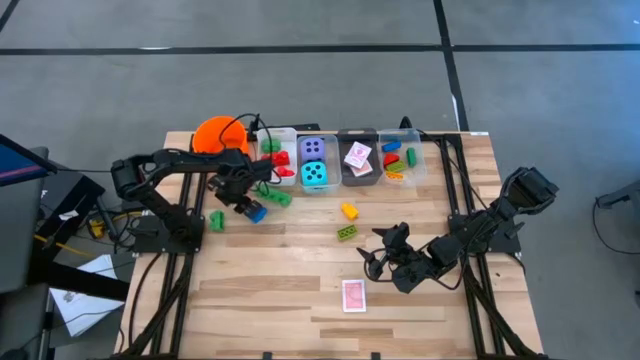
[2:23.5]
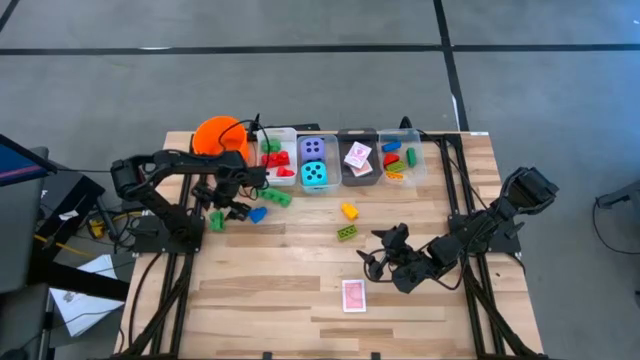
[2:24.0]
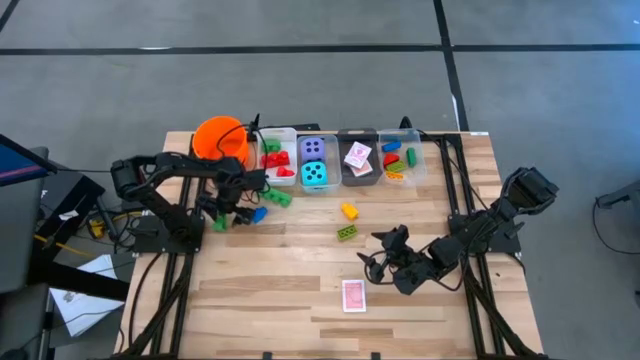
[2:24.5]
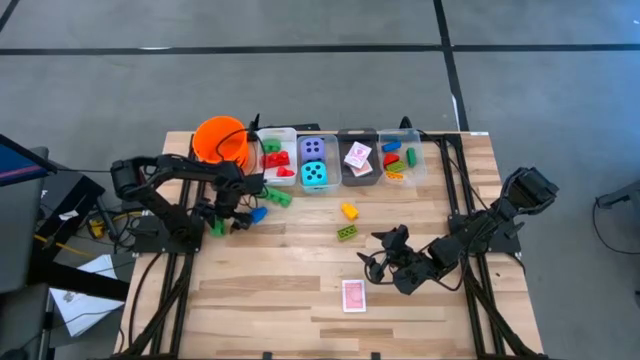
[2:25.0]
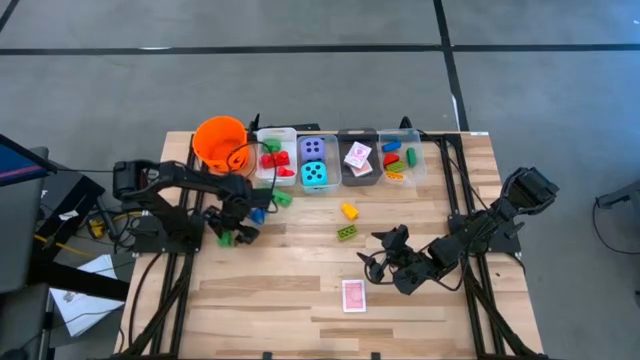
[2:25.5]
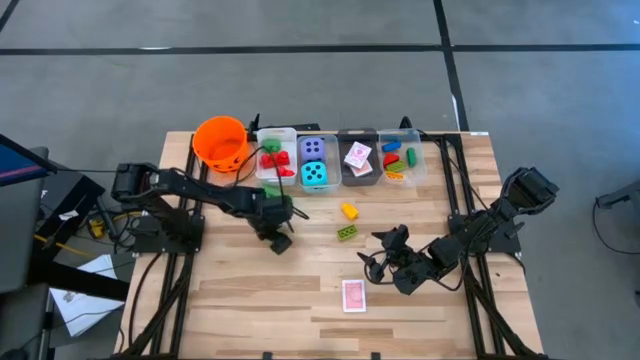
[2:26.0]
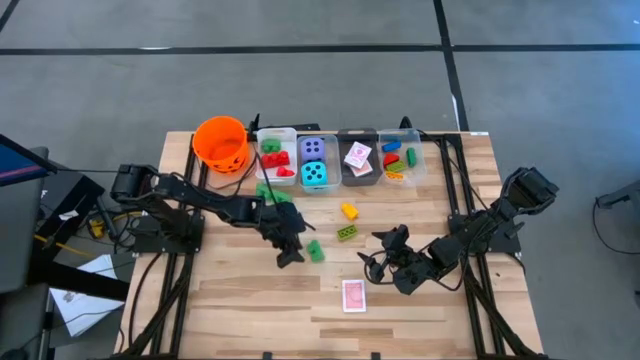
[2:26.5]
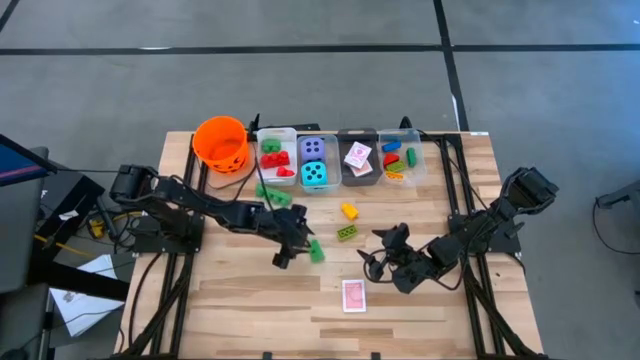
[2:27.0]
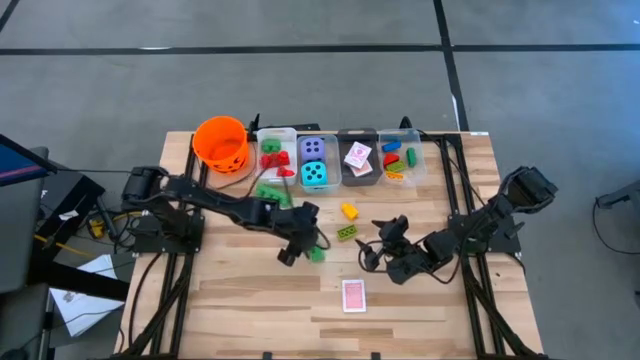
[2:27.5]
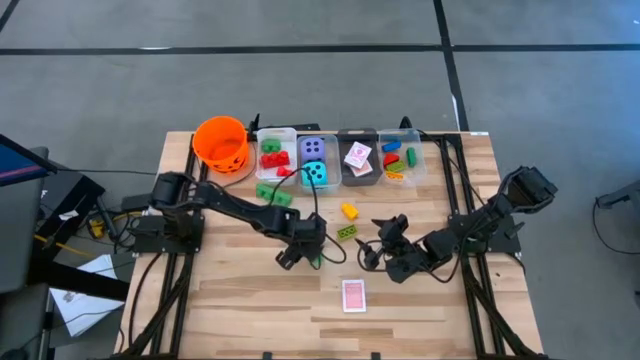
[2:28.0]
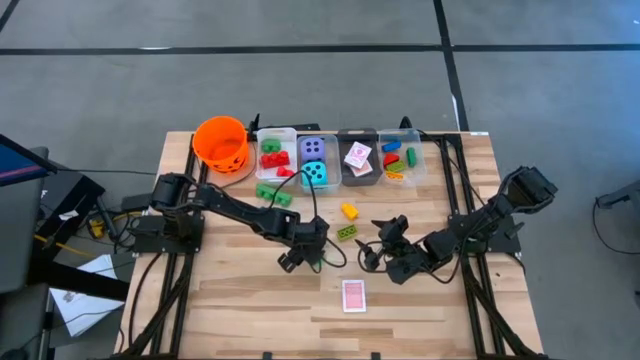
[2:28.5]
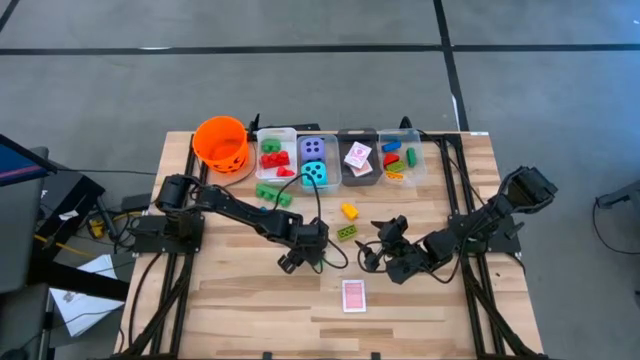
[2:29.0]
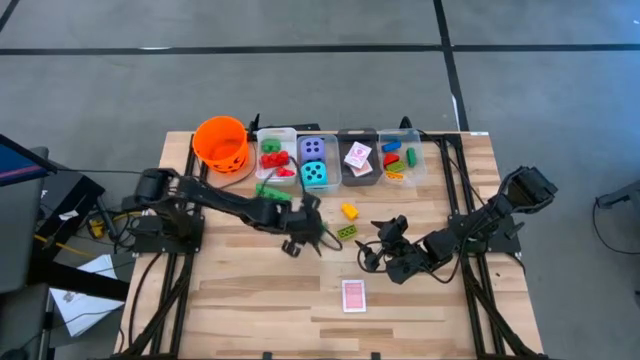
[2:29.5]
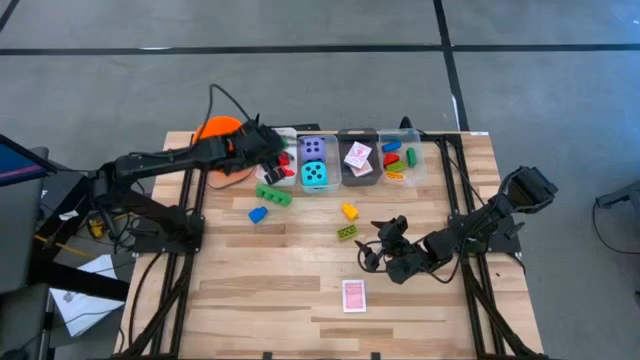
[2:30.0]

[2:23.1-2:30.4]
Task: Pick & Place Toys
Put the big green game piece into the white bin

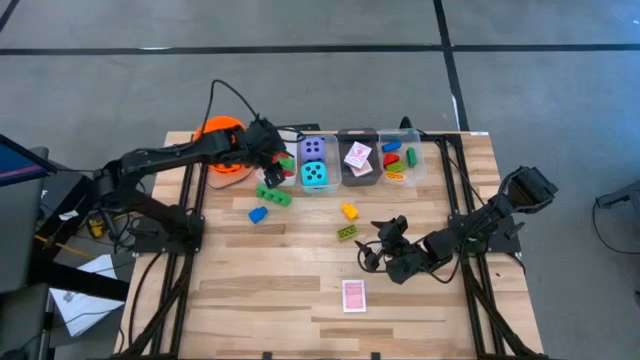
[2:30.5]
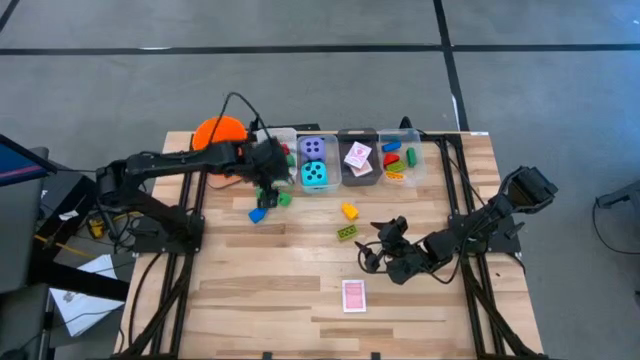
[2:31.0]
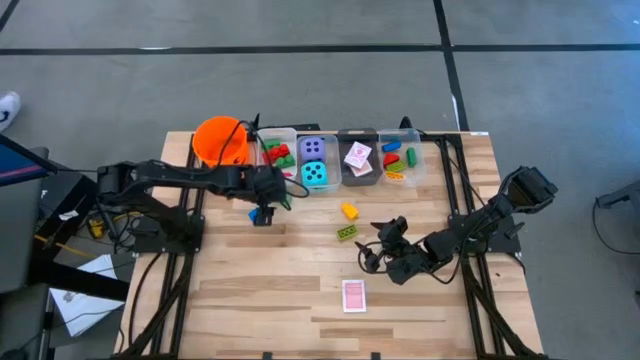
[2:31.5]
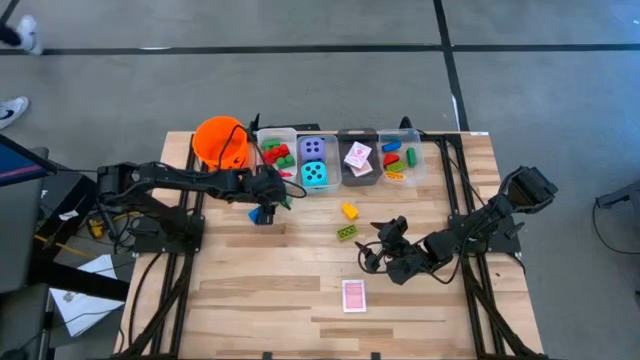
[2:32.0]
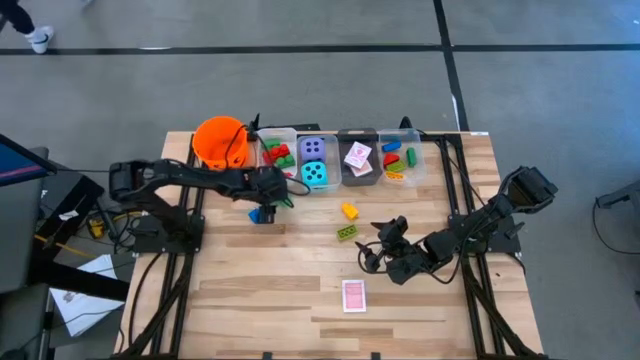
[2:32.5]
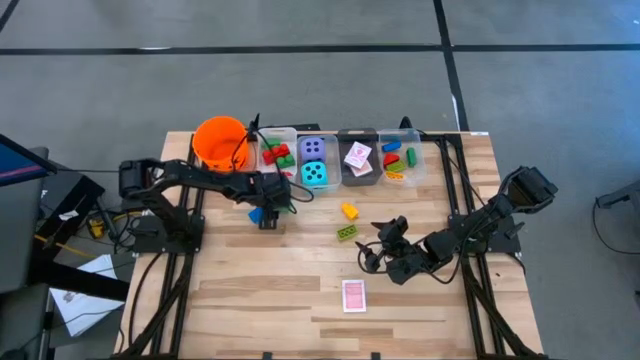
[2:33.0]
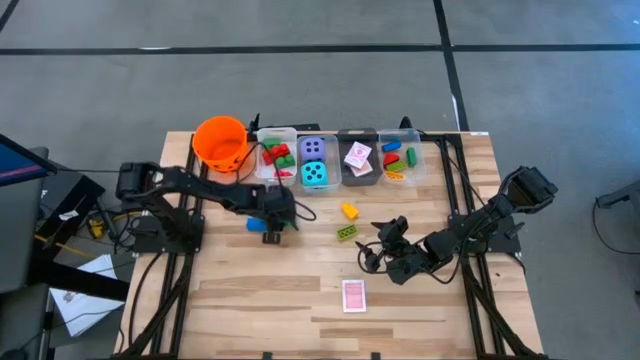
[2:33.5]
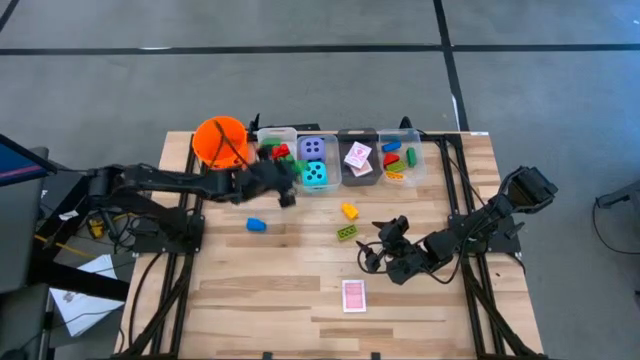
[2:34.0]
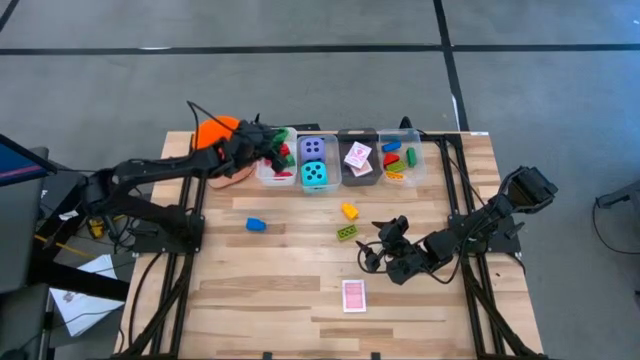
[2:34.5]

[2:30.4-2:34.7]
Put the big green game piece into the white bin

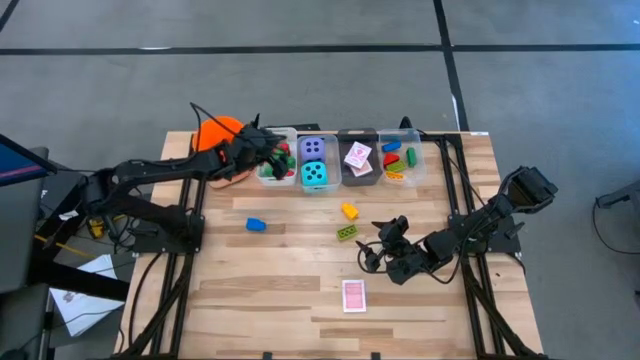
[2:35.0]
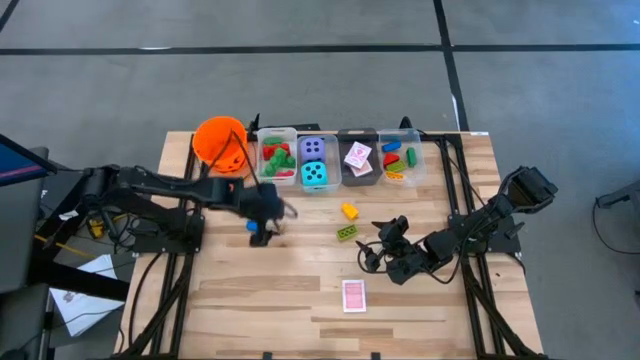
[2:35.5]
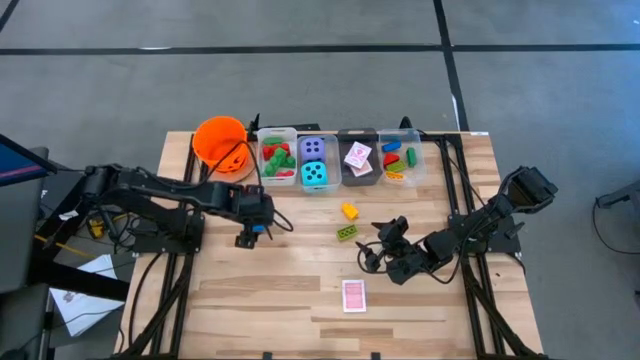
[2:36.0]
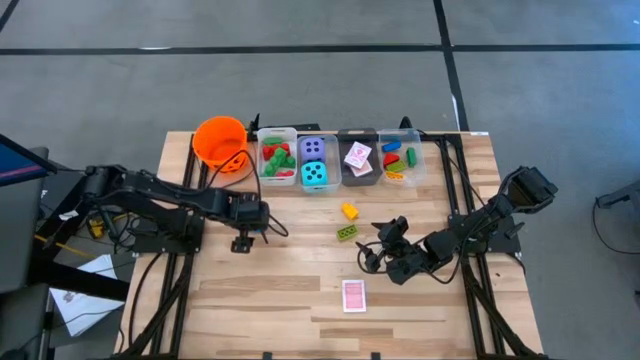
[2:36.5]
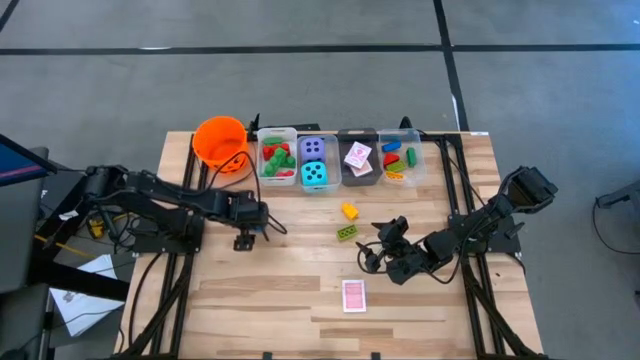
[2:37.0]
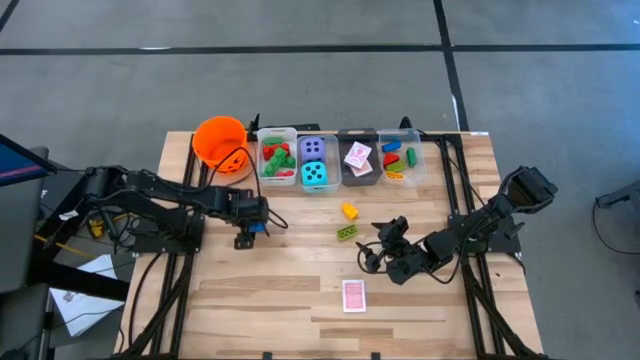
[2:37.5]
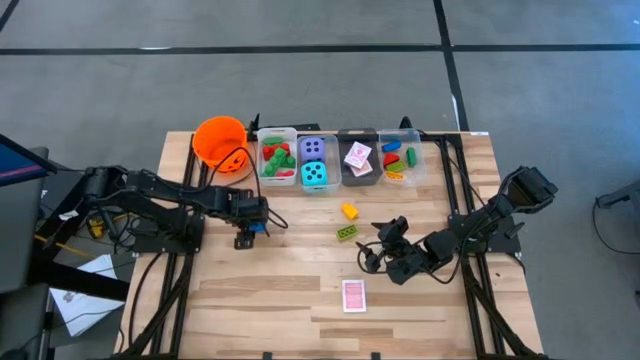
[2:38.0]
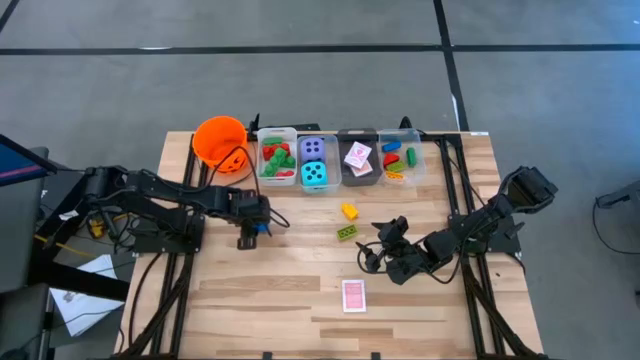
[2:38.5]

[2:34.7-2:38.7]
Put the big blue game piece into the white bin

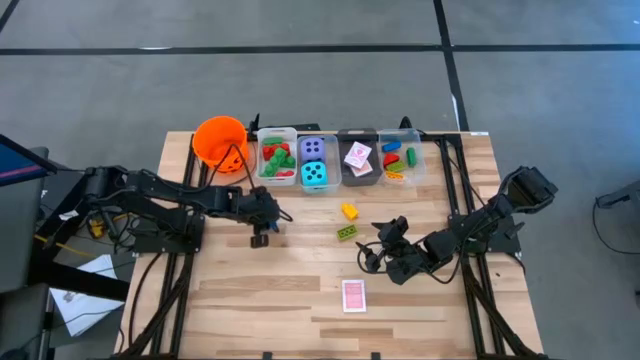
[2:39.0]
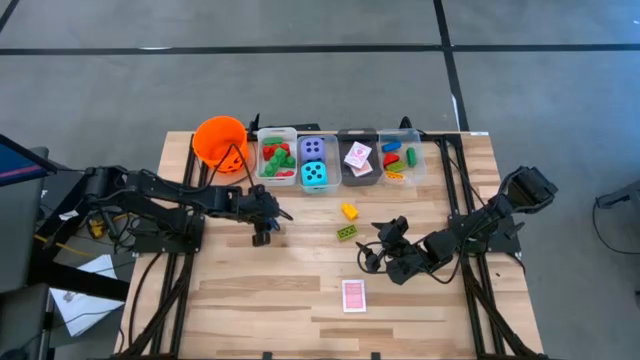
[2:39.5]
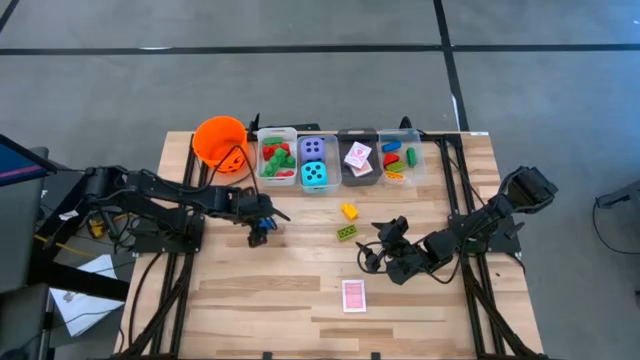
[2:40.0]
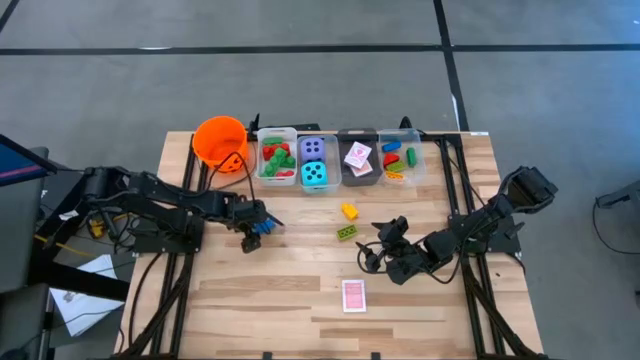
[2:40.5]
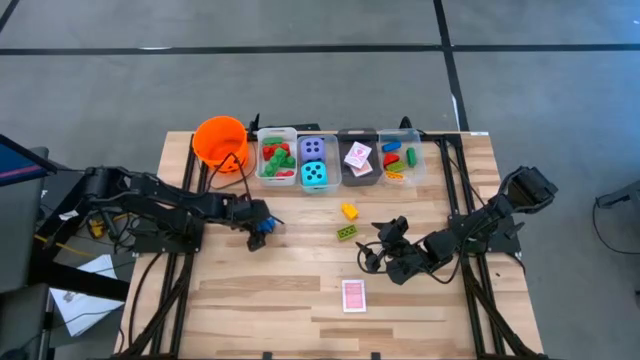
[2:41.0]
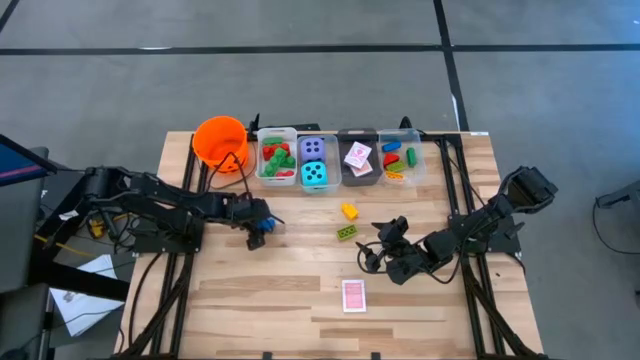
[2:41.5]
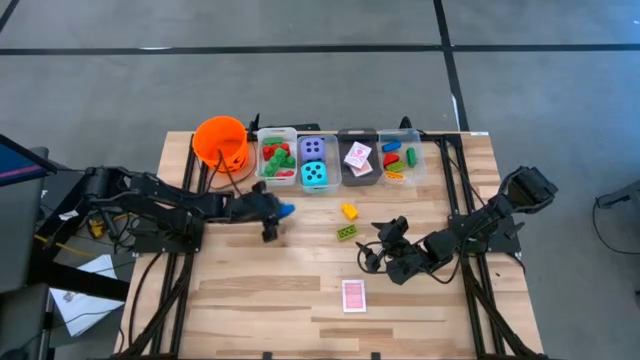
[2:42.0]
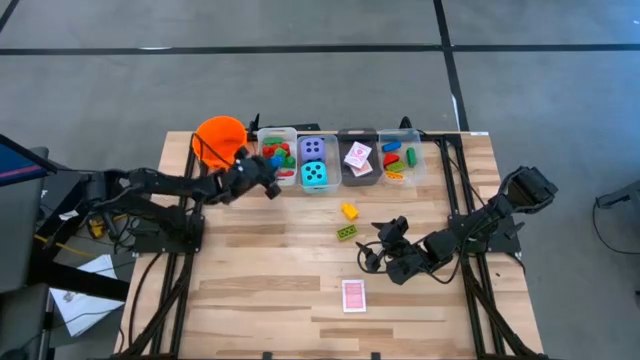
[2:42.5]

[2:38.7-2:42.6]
Put the big blue game piece into the white bin

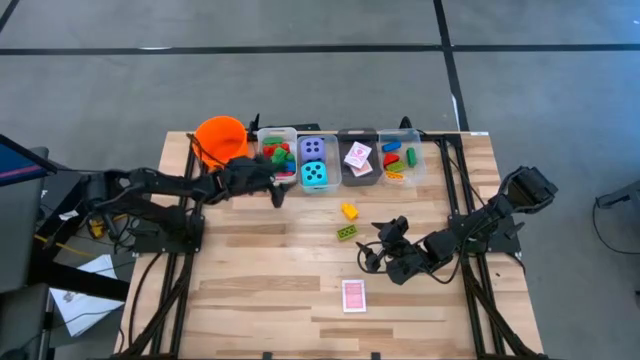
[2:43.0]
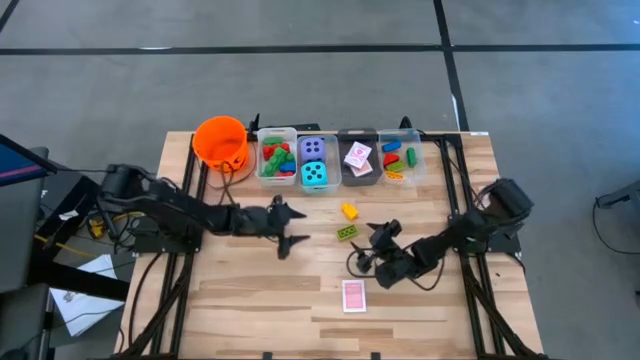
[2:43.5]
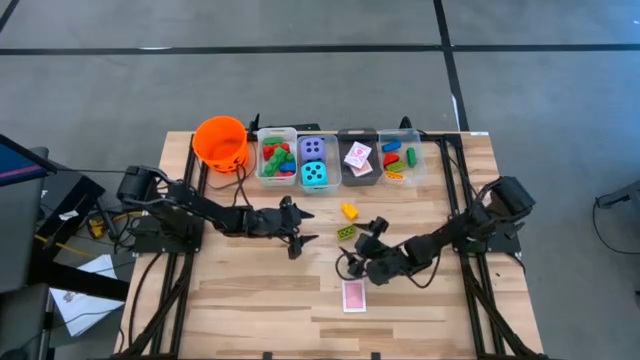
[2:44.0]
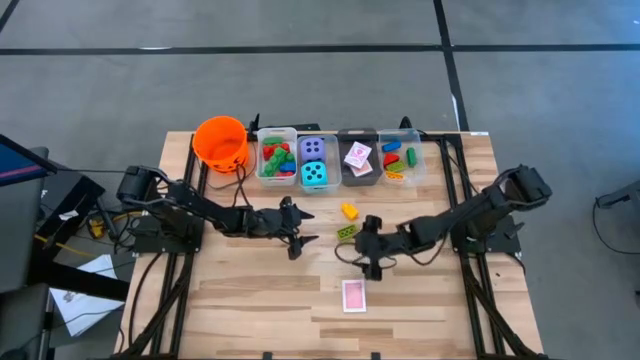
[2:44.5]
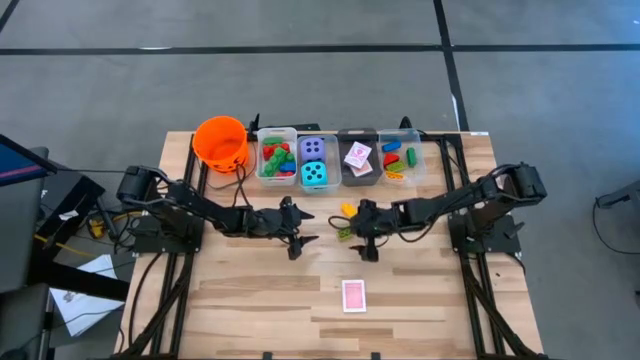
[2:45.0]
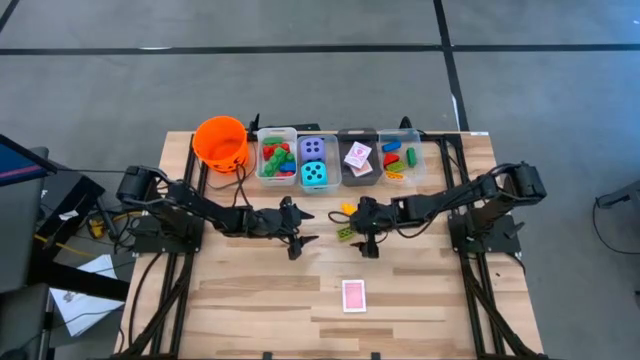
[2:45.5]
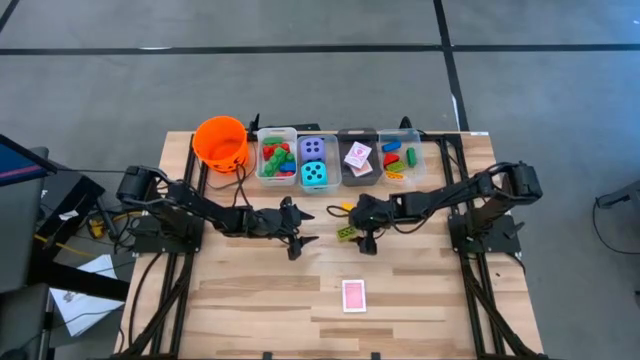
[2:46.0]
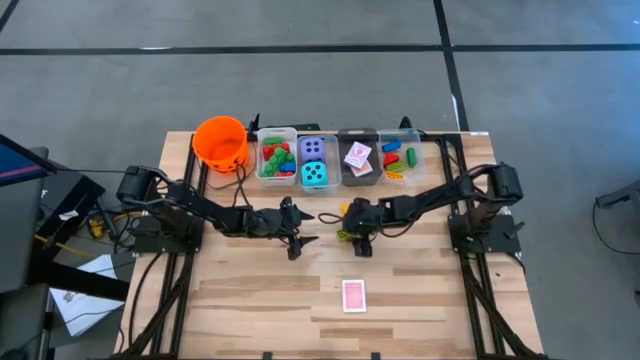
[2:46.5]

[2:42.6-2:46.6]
Put the small light green game piece into the right transparent bin
